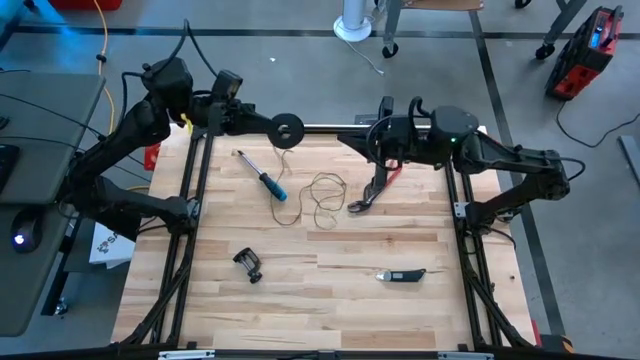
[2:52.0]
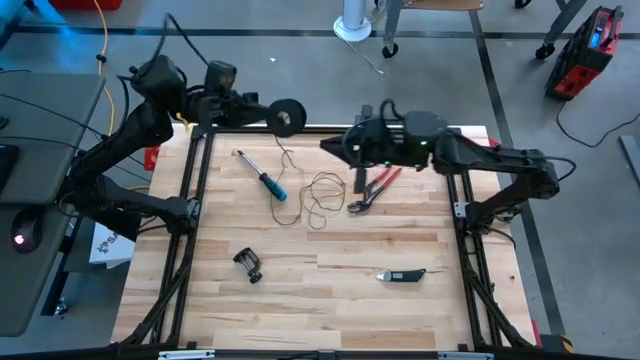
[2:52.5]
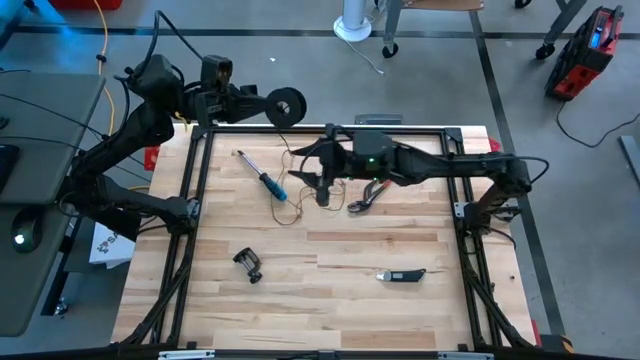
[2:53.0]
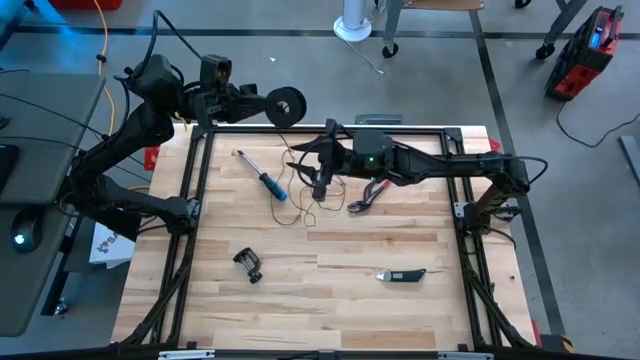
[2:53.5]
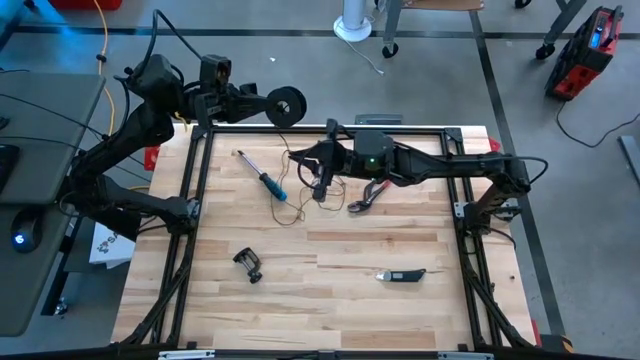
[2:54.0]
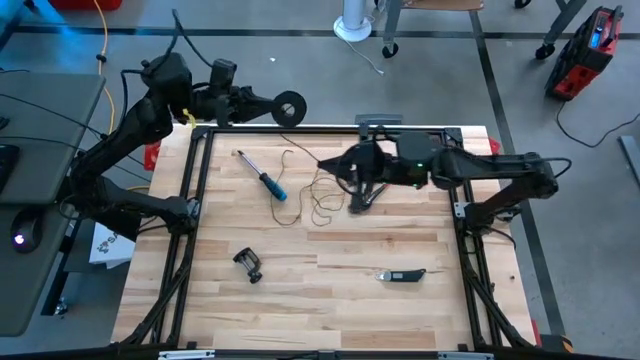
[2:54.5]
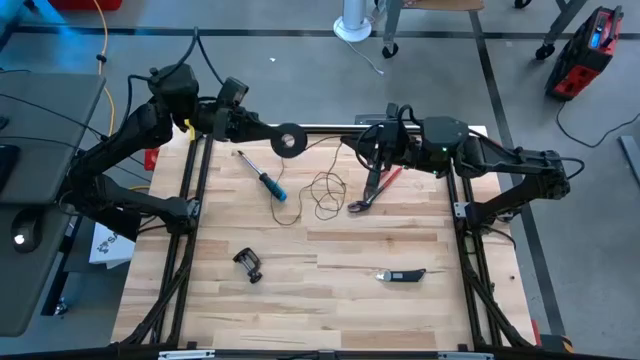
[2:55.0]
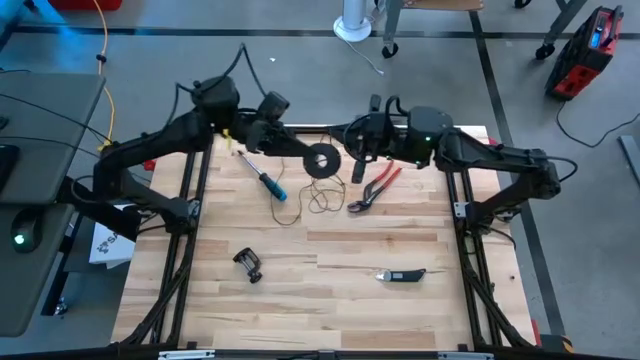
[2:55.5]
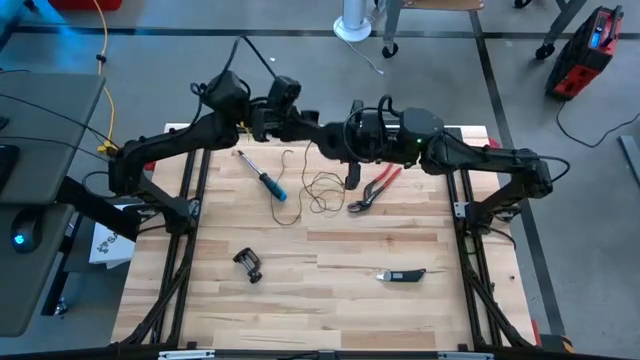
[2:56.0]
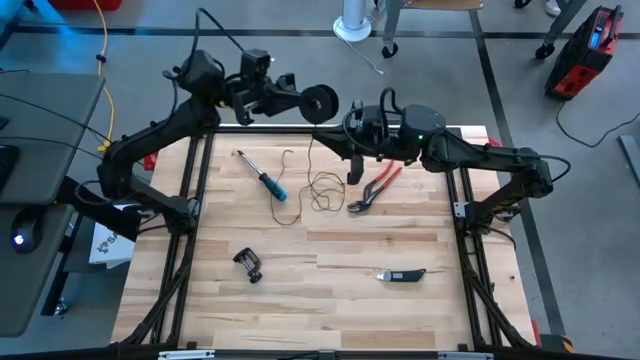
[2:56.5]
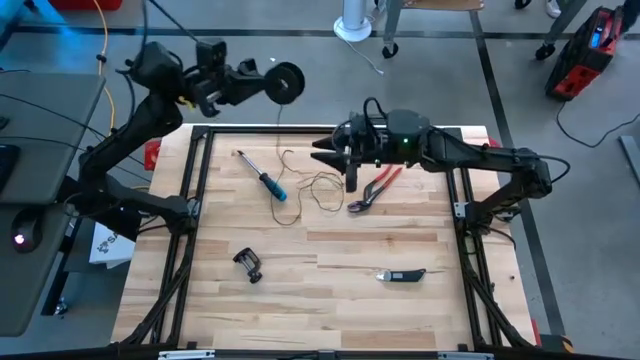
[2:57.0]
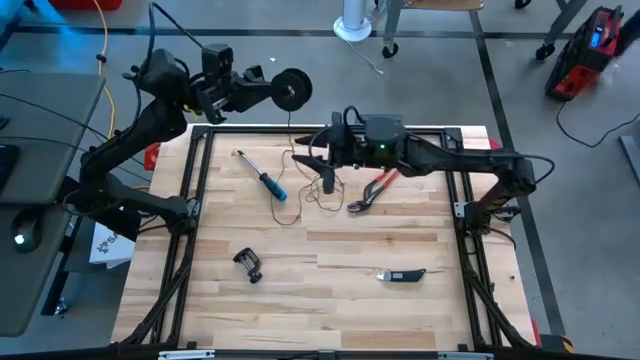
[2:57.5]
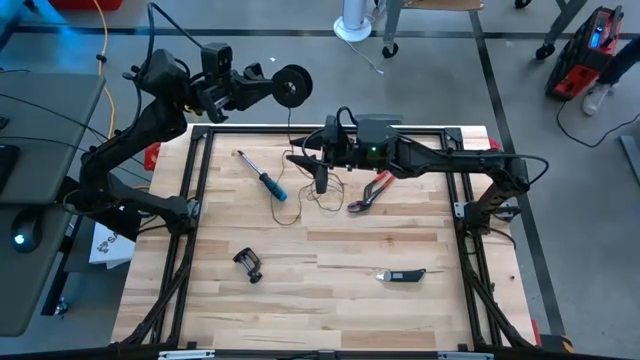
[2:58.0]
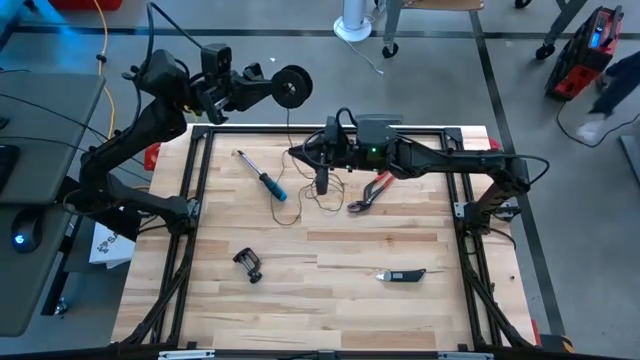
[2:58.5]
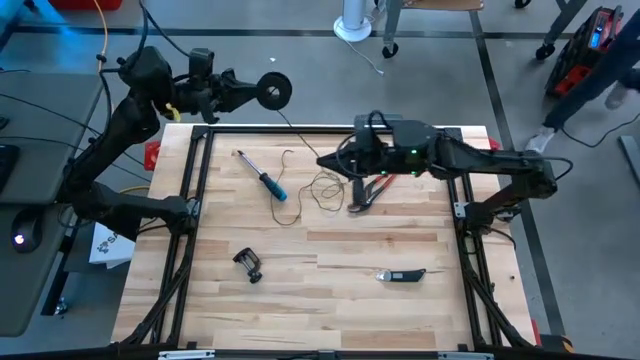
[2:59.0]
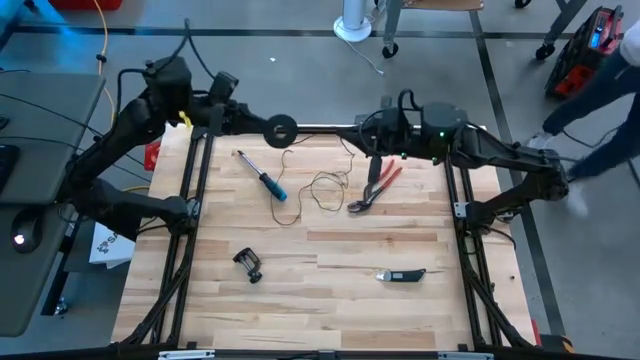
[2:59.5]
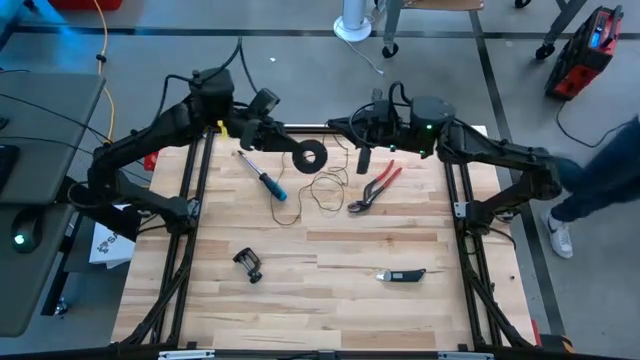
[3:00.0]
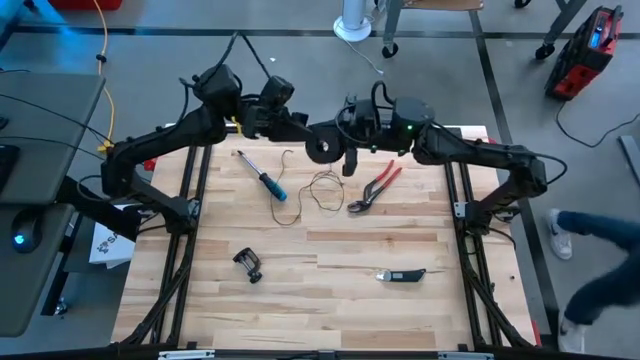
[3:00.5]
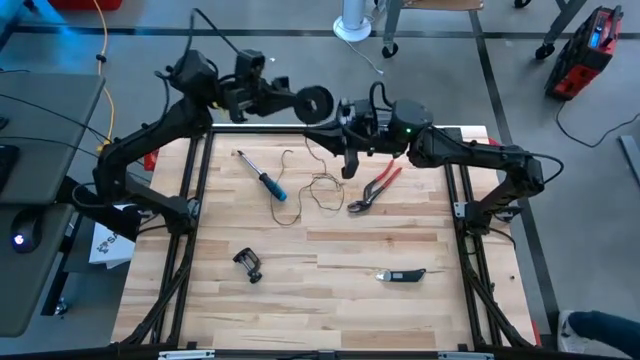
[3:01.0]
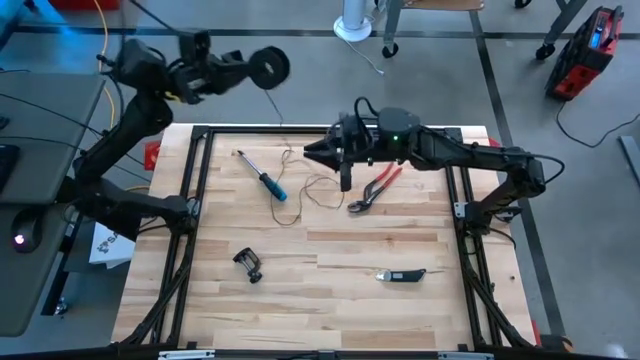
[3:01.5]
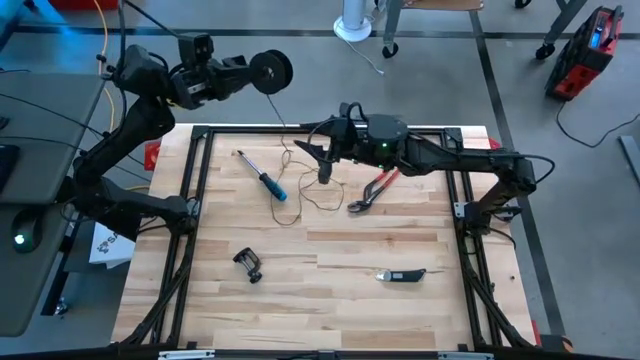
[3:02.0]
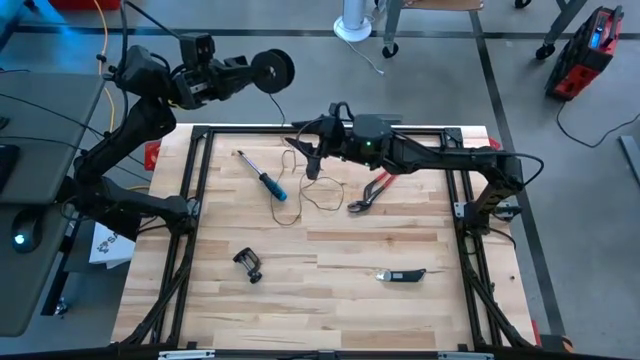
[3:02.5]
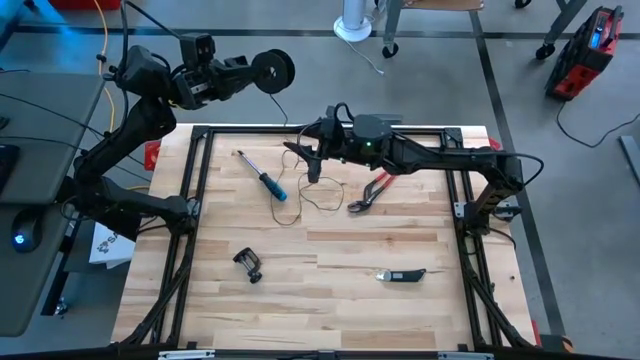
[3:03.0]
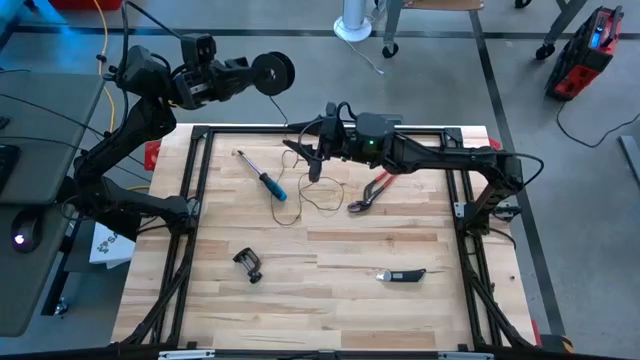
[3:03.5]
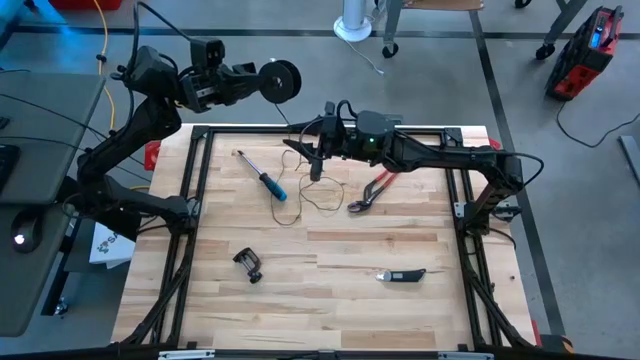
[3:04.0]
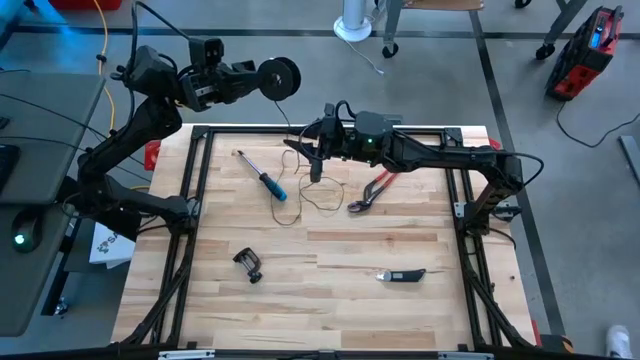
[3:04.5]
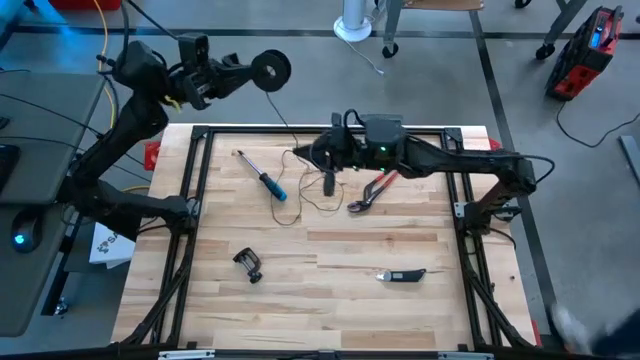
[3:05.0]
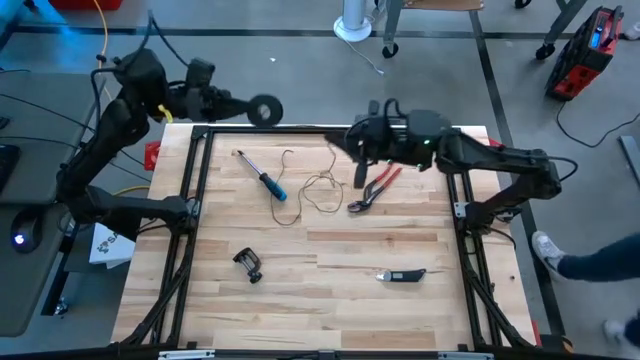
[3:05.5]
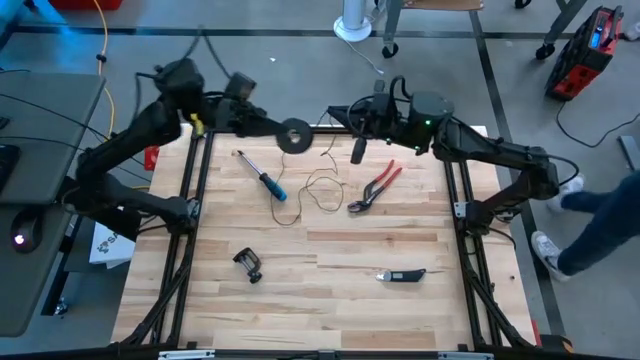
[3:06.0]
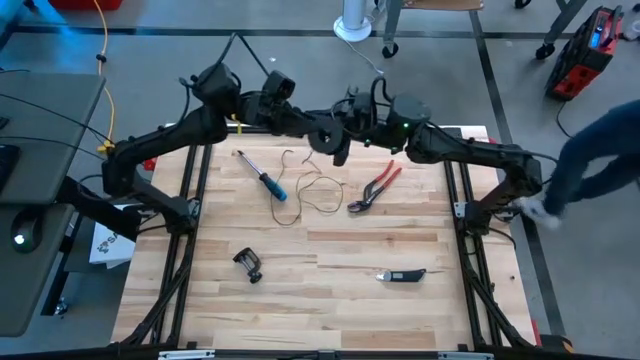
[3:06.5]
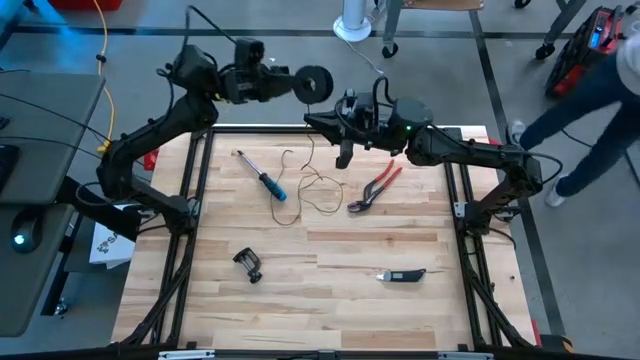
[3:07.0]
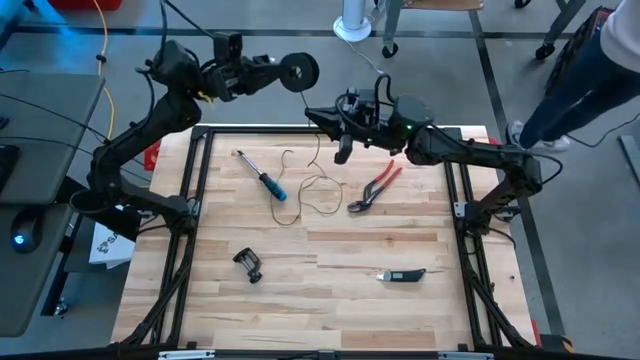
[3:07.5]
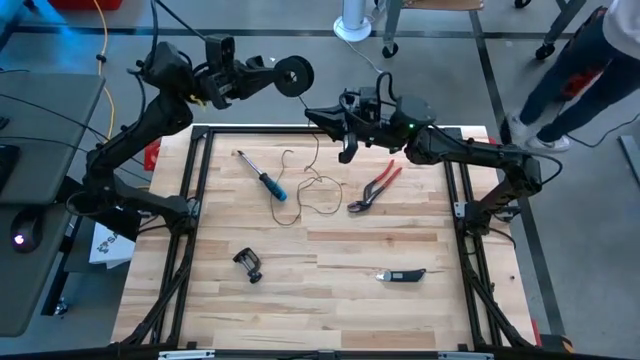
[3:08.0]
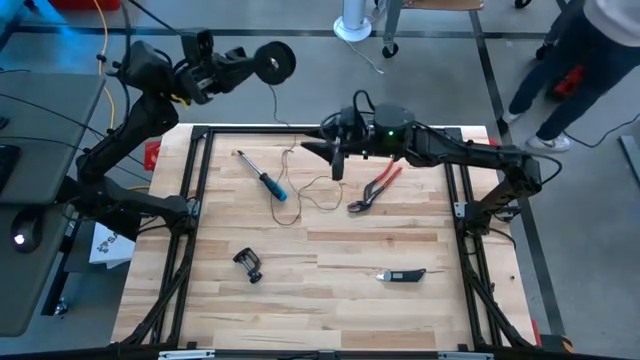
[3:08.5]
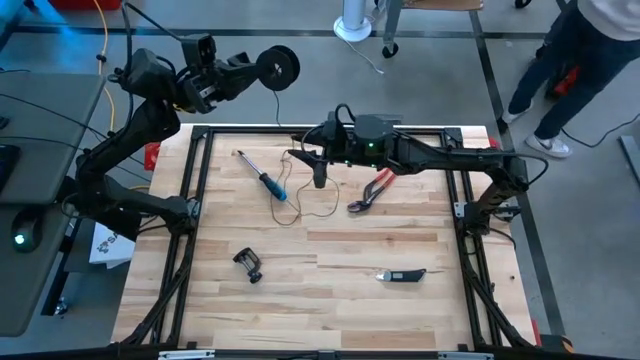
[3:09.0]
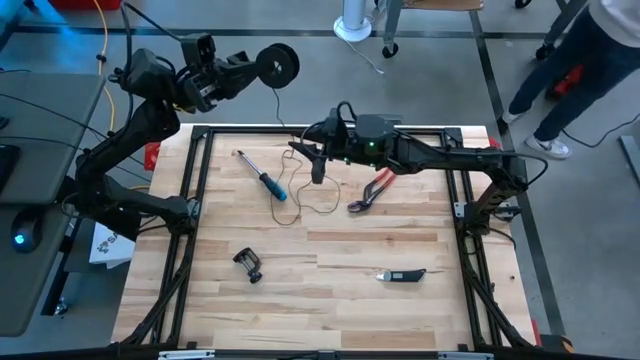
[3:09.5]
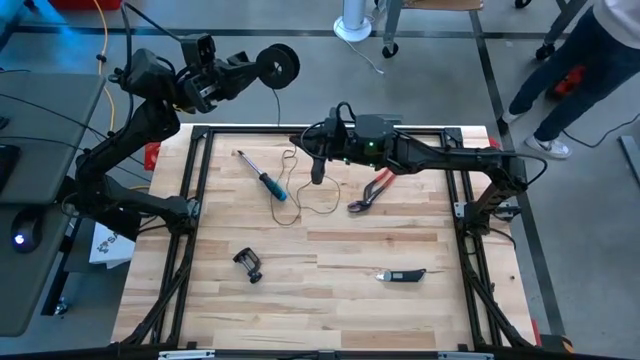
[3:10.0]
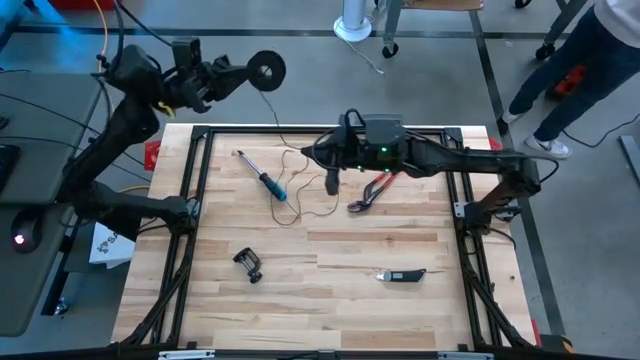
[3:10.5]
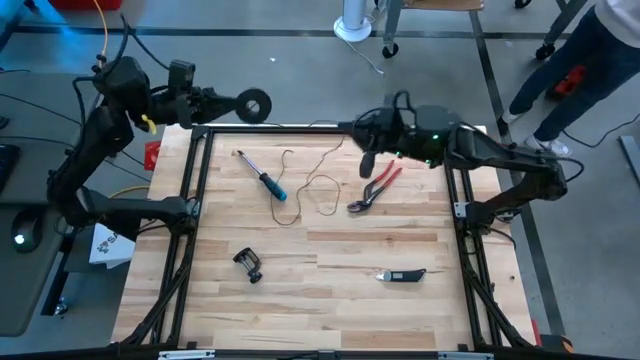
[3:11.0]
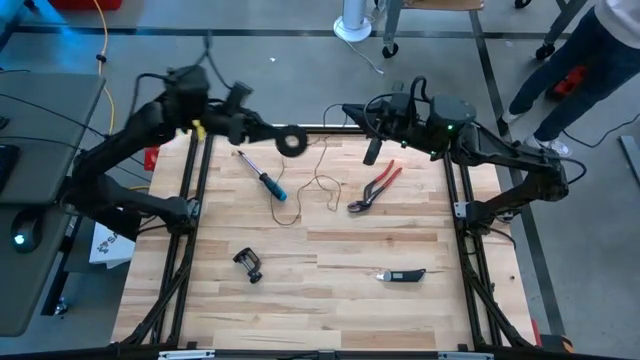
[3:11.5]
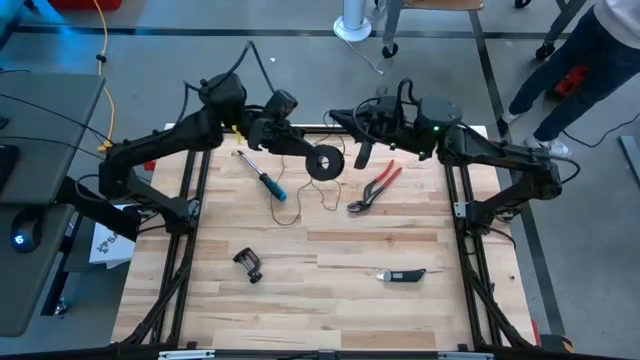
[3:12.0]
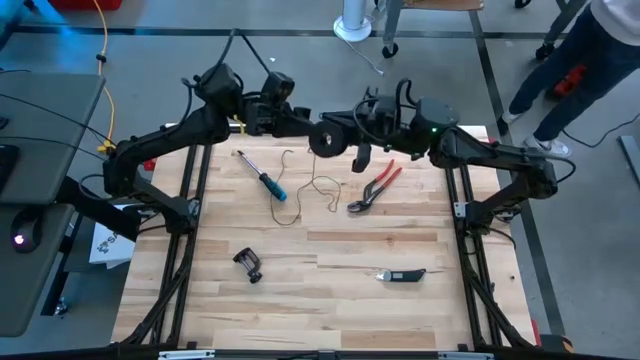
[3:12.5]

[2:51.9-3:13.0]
Task: Coil cords
Coil the black wire onto the black spool
